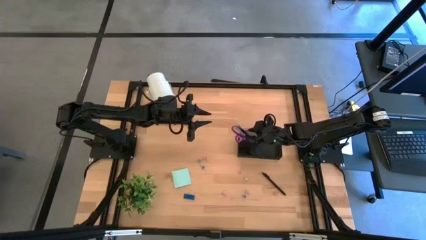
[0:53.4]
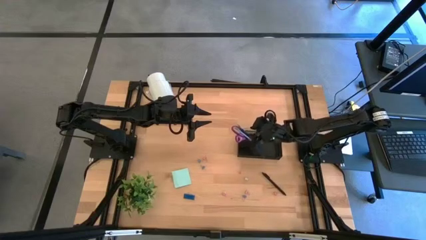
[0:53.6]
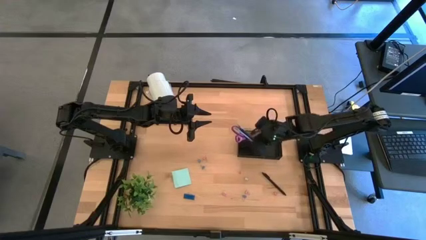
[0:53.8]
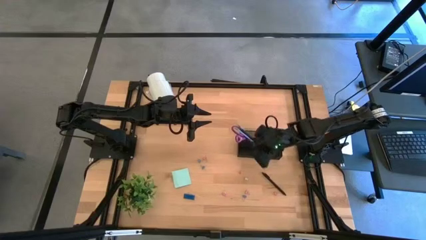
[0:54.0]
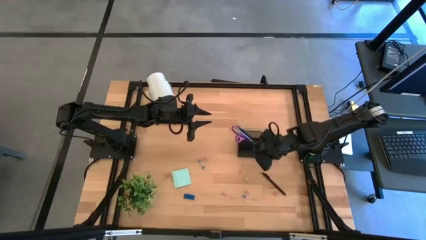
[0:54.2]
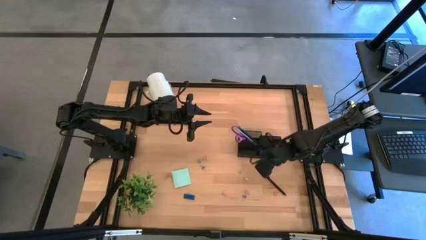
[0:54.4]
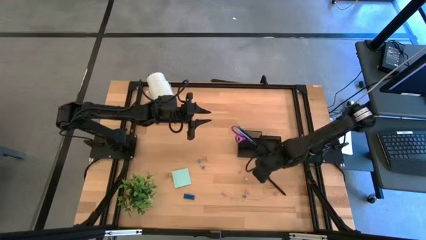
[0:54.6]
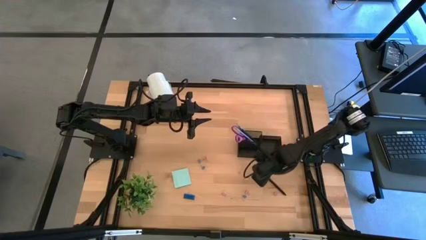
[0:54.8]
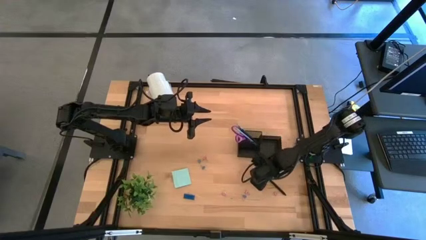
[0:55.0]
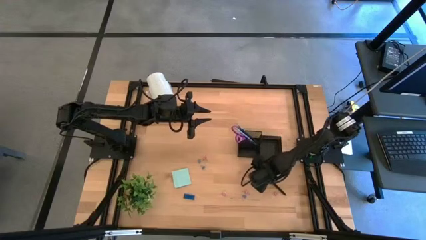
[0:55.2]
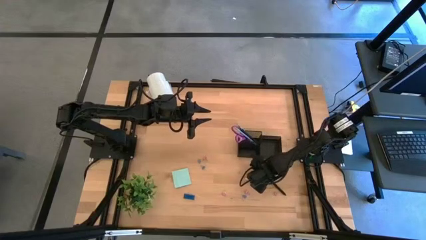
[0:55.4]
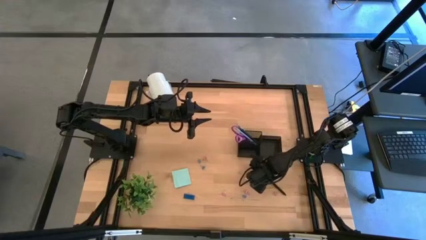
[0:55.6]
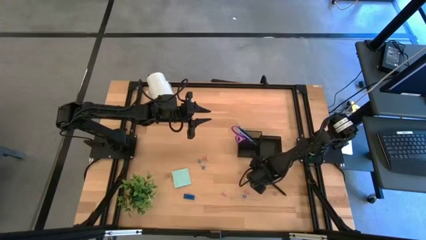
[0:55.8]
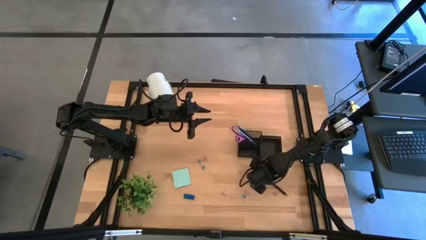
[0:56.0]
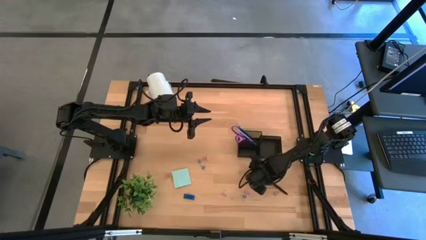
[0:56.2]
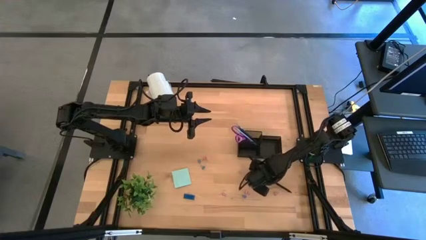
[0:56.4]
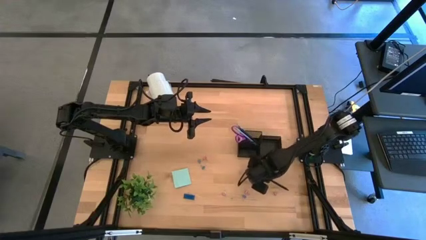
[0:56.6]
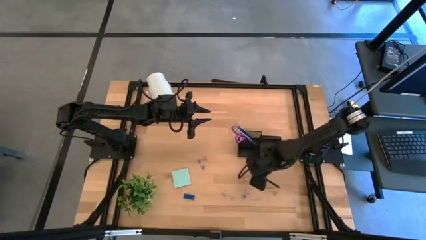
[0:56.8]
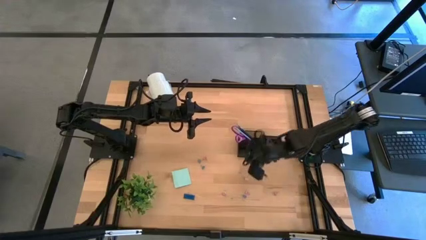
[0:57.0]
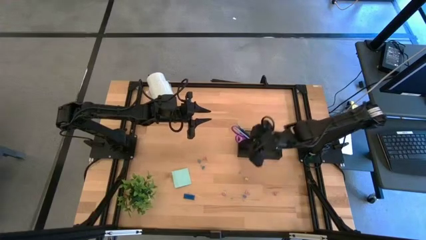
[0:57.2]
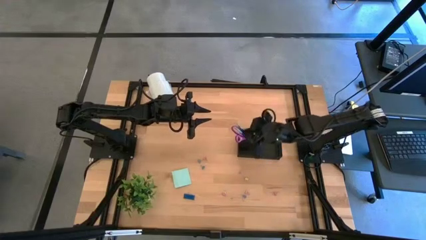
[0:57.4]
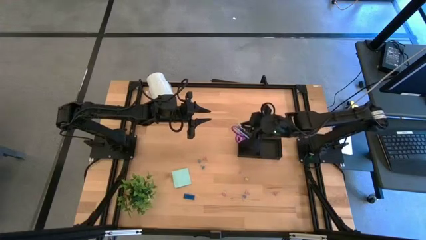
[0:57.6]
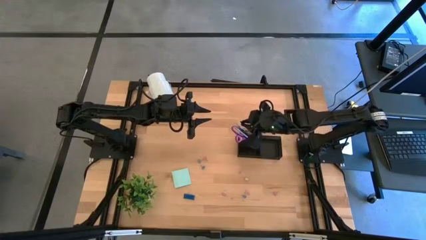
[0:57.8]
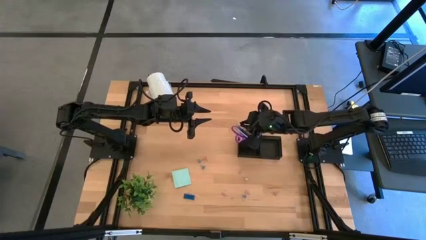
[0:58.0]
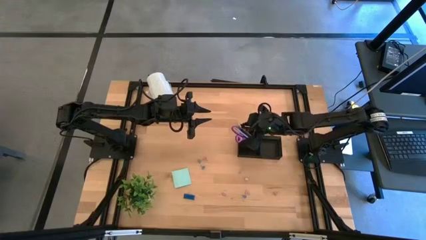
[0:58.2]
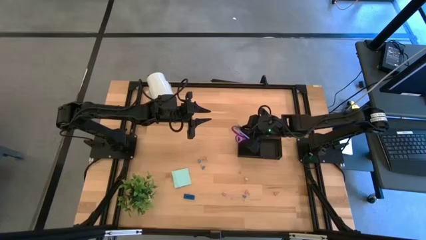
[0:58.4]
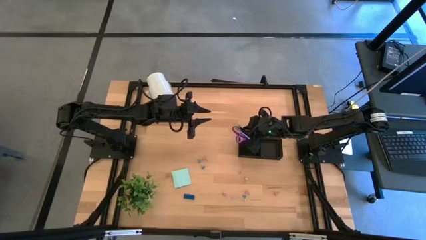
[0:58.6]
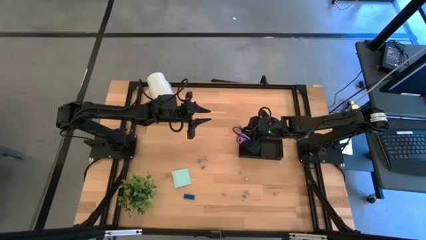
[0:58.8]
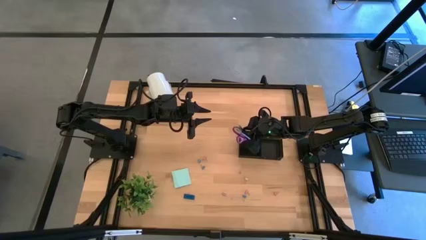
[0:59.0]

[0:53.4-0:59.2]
Task: Pick and place office supplies into organizer
Put the black pen into the black desk organizer

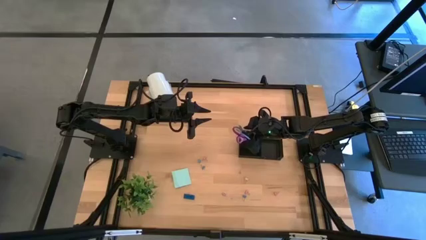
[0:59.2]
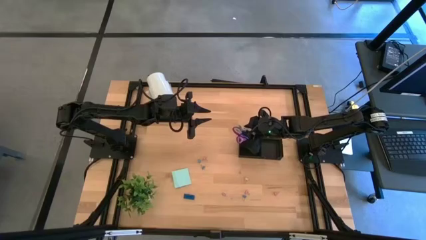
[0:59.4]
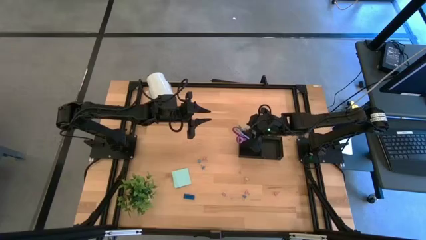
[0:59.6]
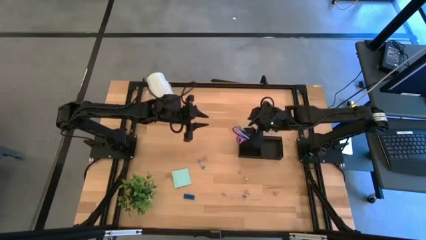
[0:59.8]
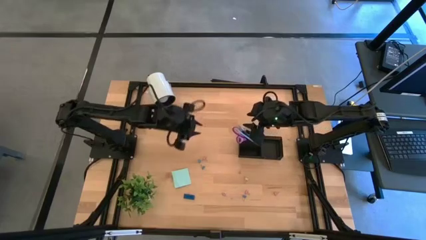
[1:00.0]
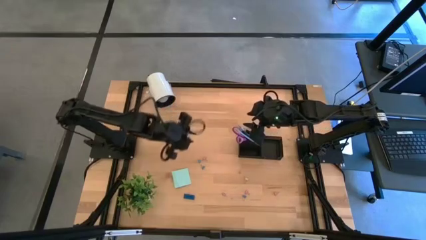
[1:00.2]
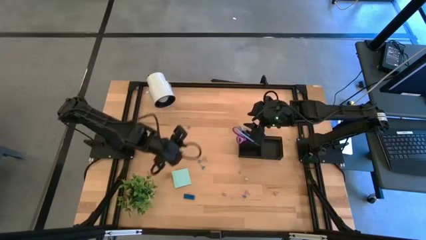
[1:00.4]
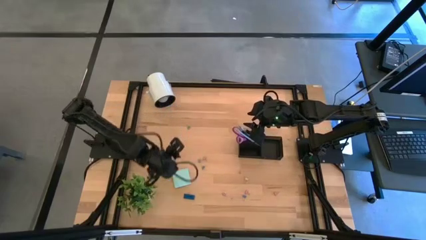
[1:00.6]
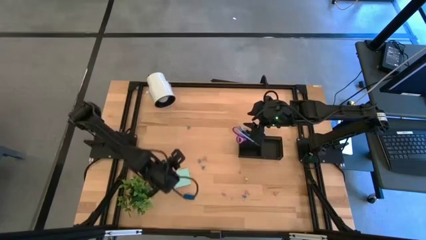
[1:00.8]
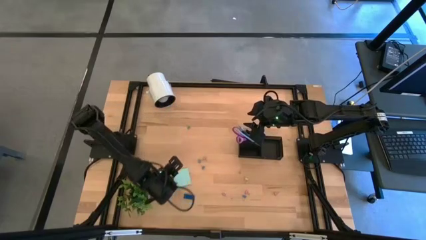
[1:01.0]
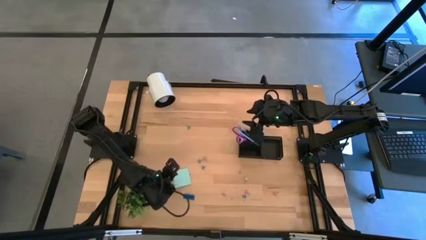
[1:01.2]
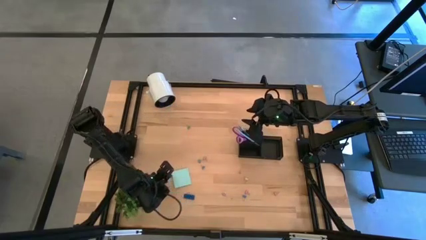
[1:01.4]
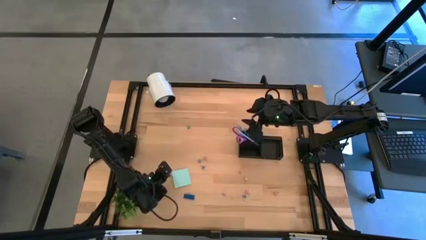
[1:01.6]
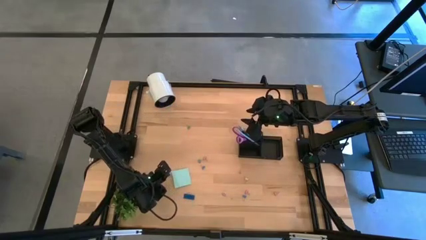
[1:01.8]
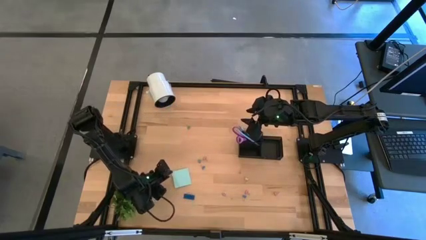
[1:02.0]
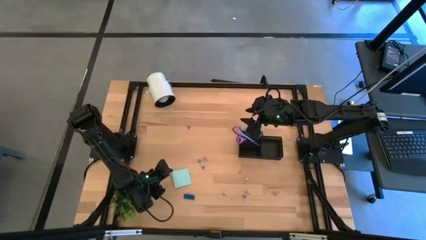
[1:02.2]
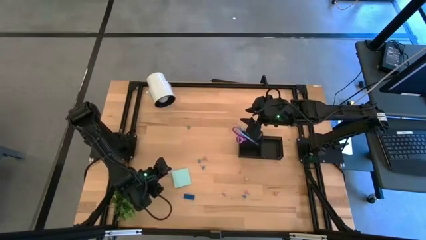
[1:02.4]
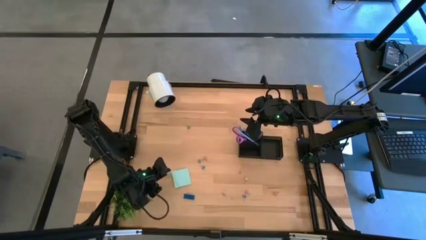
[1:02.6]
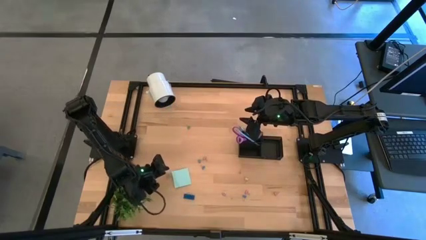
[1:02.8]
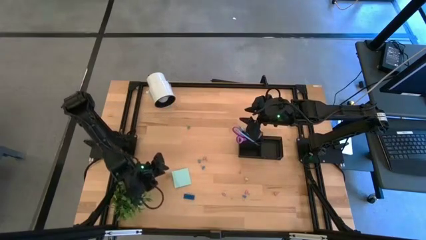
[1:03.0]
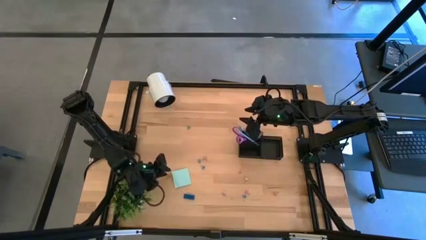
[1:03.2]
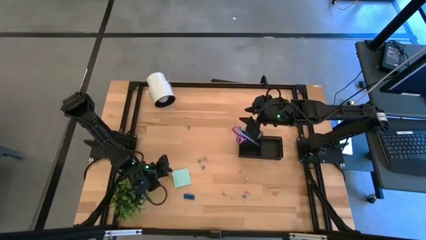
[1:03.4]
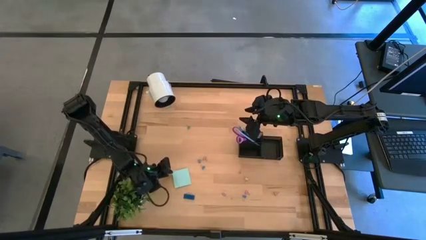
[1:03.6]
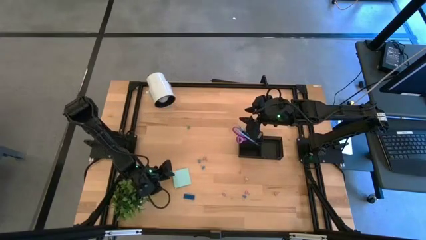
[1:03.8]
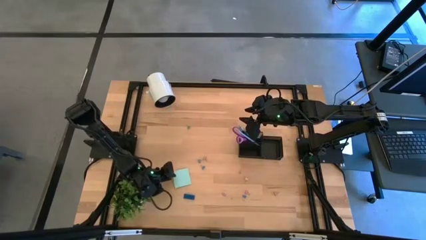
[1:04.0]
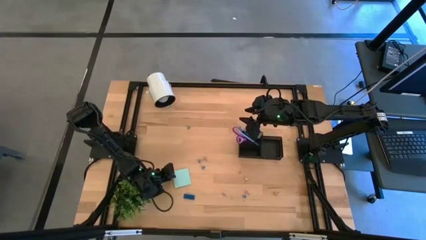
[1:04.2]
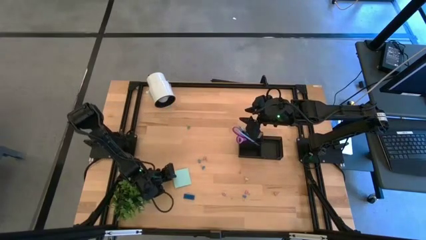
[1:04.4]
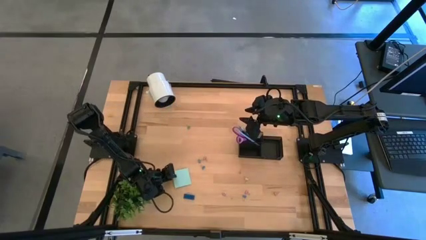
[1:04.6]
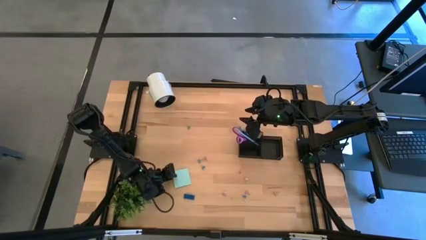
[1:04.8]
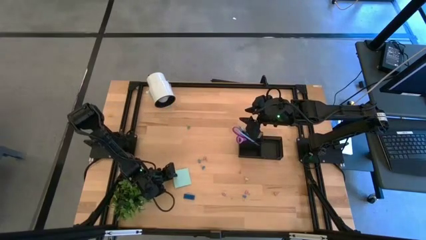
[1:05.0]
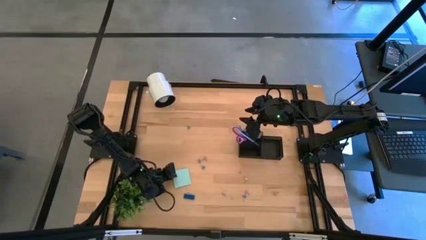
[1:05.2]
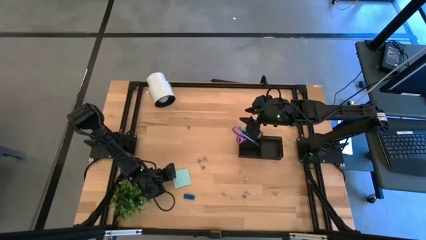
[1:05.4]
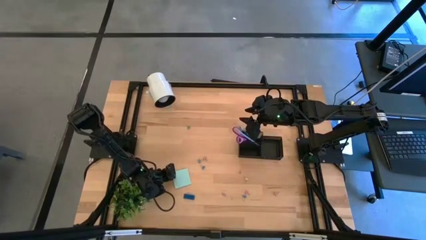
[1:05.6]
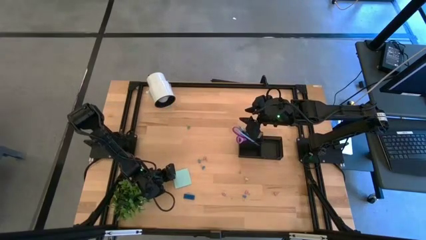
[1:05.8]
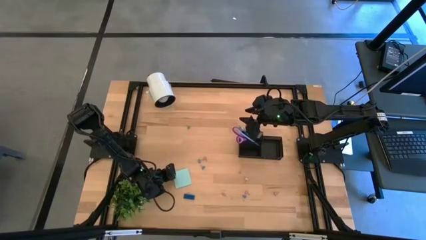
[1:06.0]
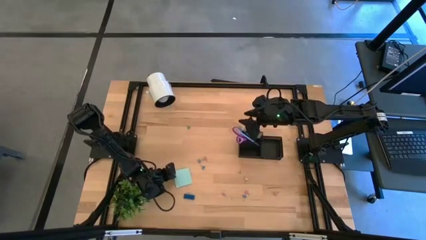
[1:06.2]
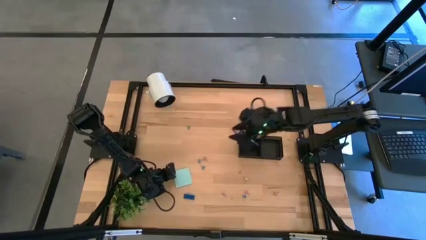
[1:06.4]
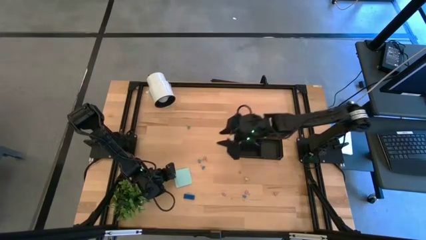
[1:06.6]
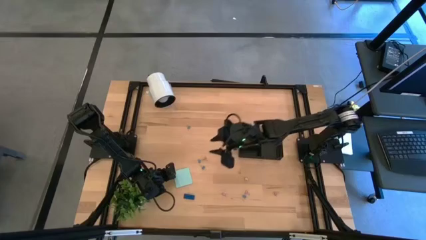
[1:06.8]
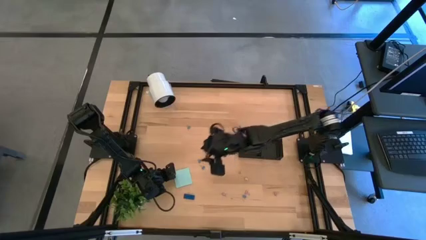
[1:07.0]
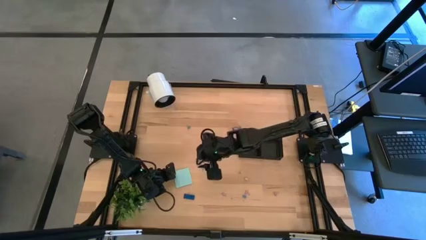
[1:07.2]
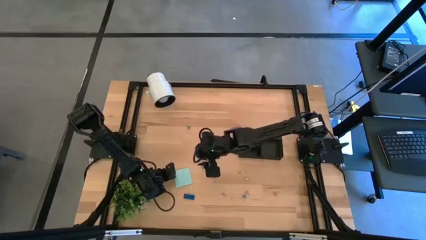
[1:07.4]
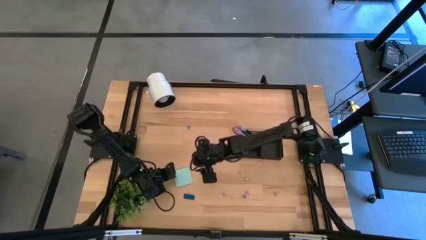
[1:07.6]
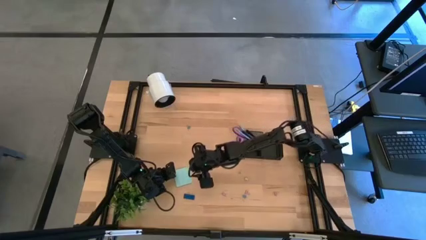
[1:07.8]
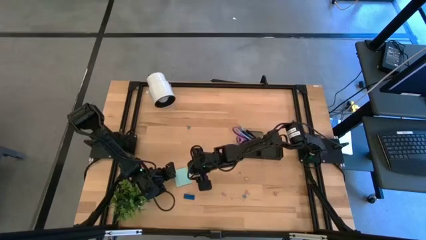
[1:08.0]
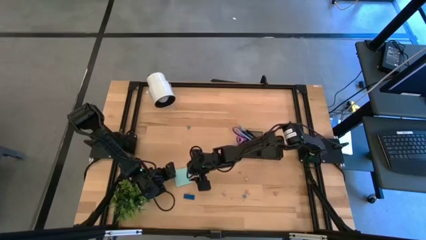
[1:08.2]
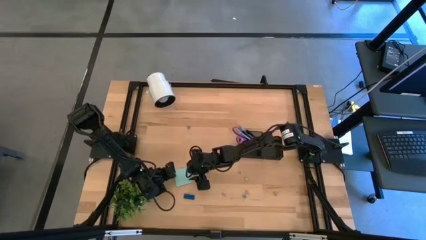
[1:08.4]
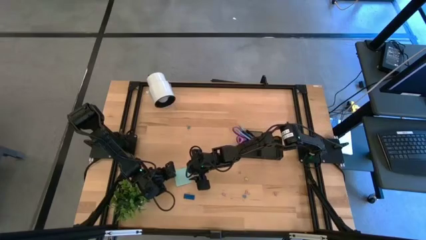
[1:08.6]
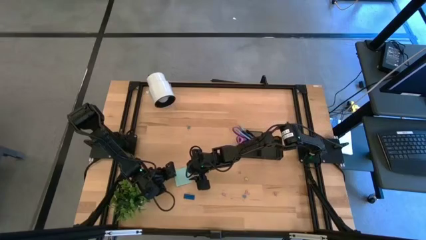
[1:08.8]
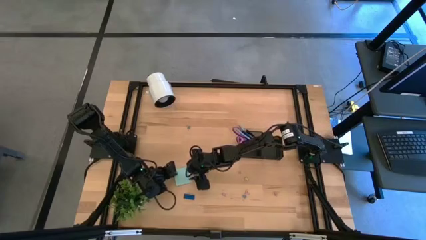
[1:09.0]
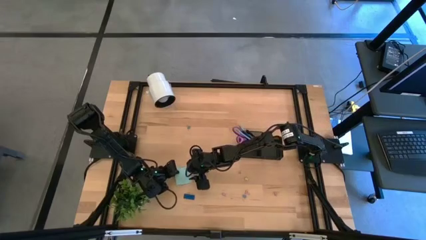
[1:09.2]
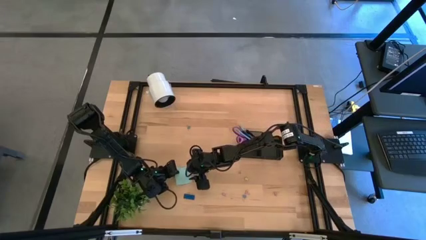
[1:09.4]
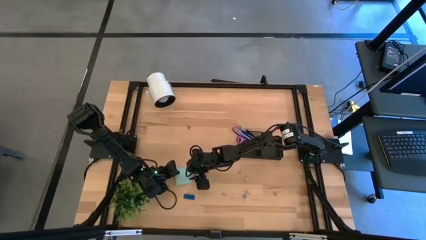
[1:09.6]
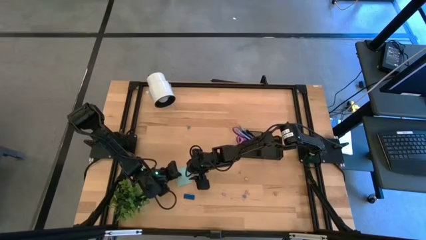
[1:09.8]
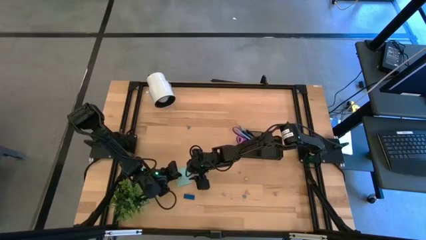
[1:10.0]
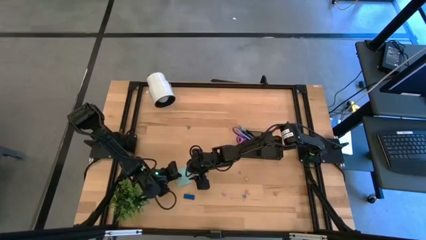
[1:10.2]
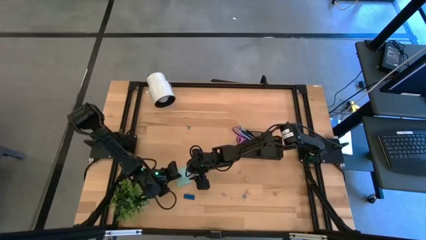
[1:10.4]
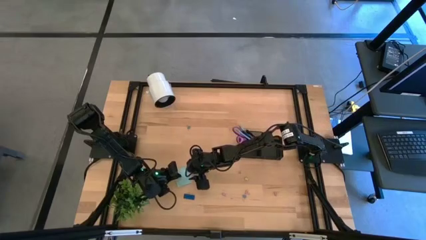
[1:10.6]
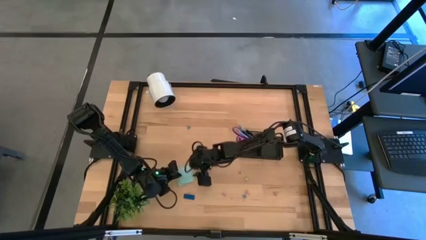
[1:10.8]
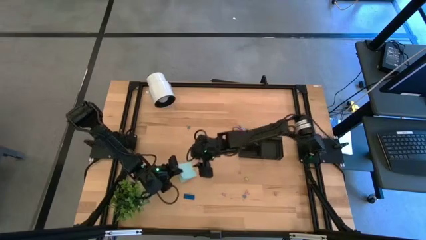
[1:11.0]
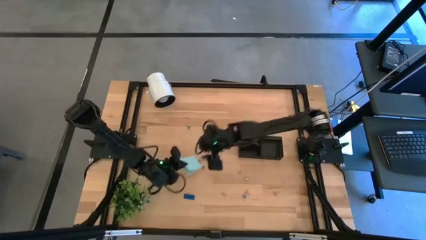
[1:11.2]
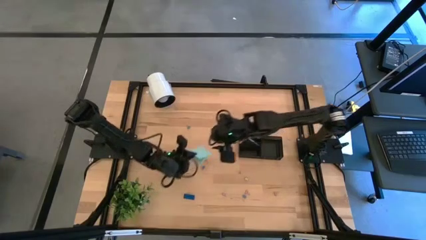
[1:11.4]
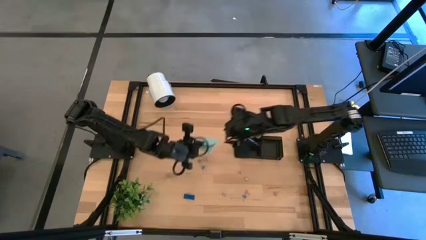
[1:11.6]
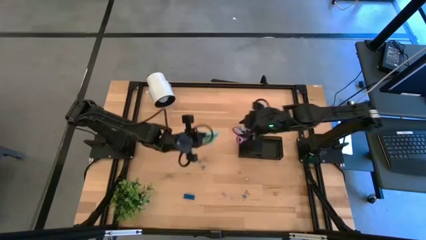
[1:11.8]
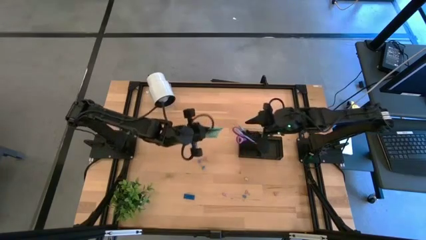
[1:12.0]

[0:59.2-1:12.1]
Put the light blue sticky notes into the black desk organizer
